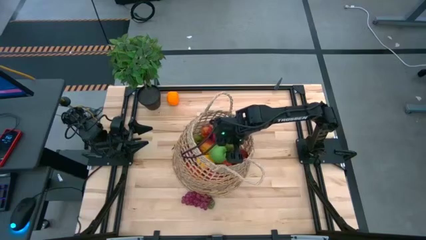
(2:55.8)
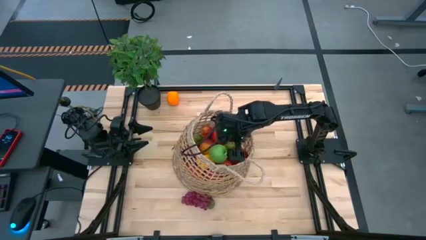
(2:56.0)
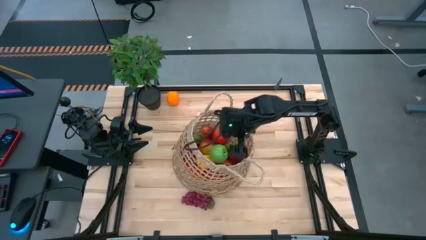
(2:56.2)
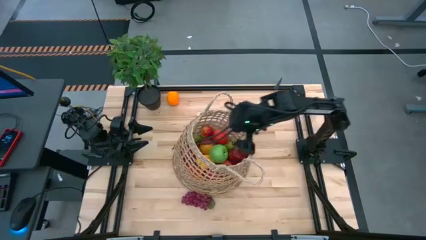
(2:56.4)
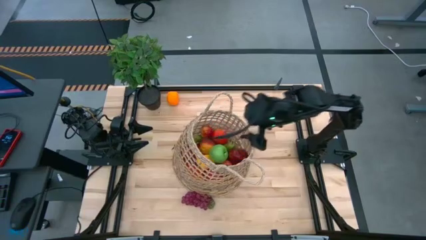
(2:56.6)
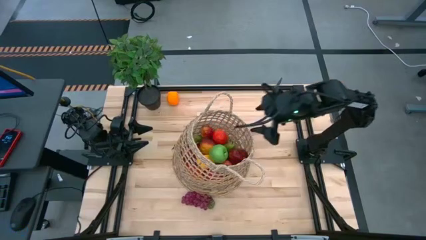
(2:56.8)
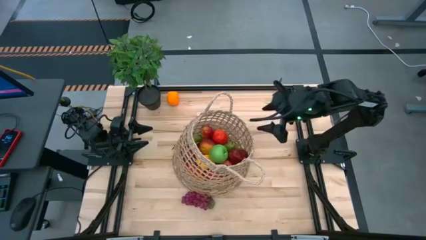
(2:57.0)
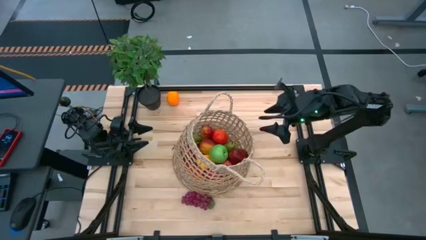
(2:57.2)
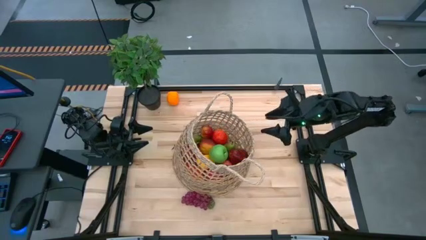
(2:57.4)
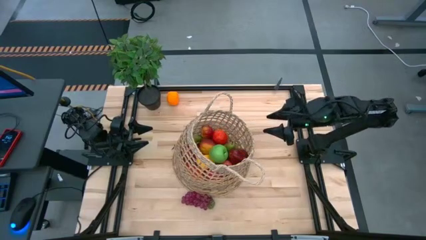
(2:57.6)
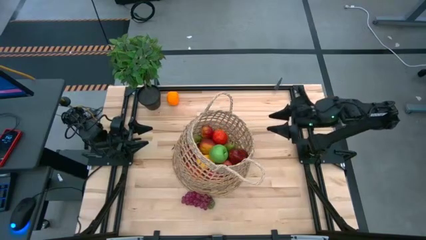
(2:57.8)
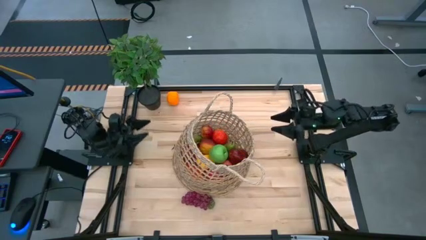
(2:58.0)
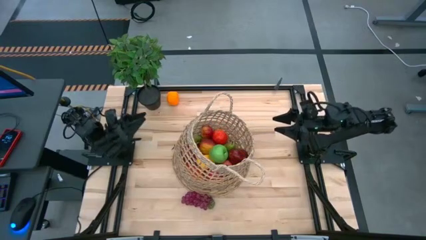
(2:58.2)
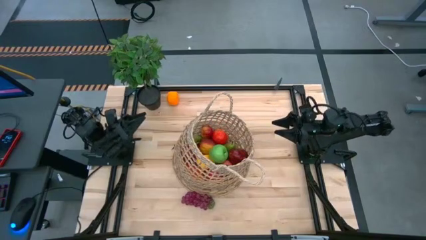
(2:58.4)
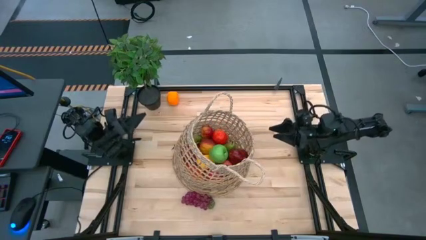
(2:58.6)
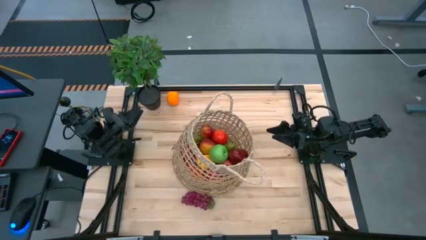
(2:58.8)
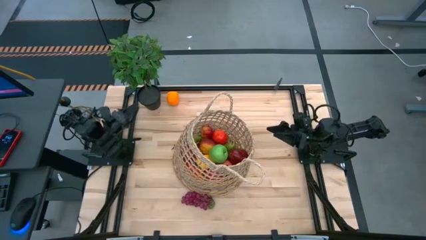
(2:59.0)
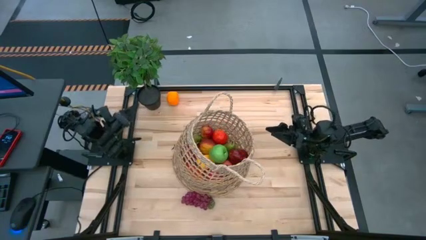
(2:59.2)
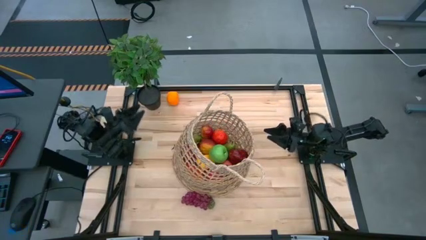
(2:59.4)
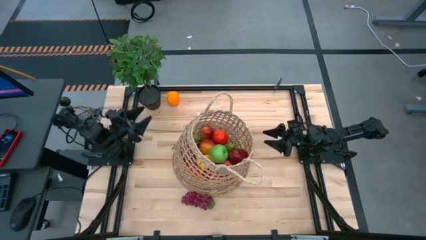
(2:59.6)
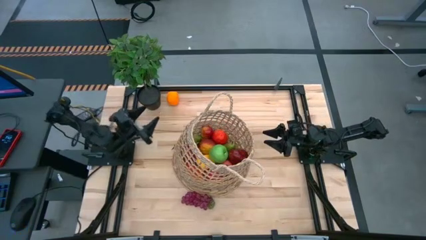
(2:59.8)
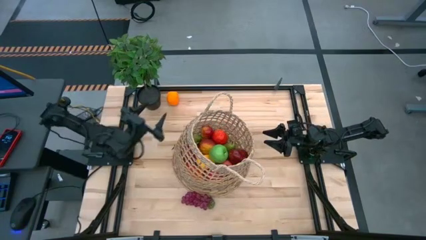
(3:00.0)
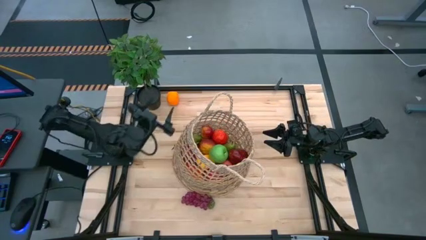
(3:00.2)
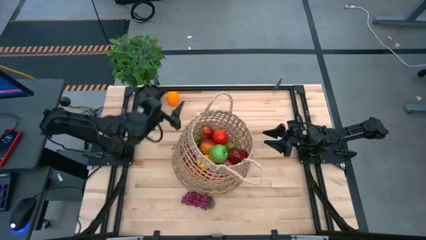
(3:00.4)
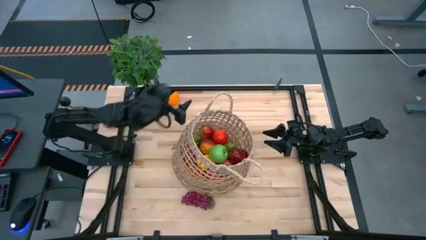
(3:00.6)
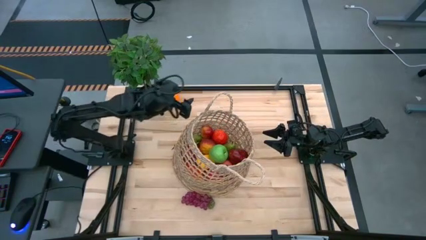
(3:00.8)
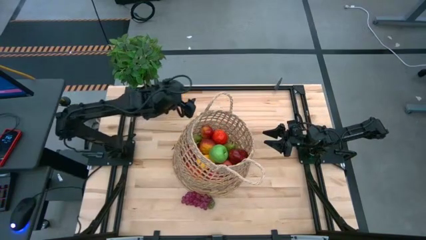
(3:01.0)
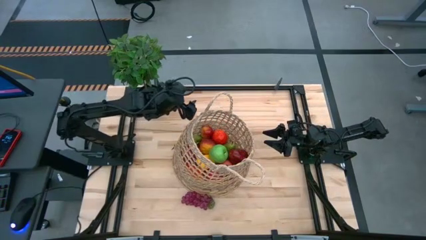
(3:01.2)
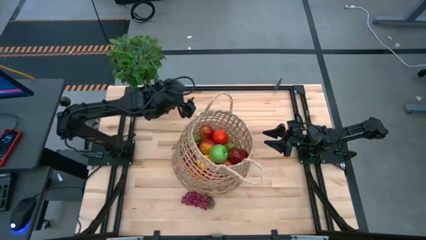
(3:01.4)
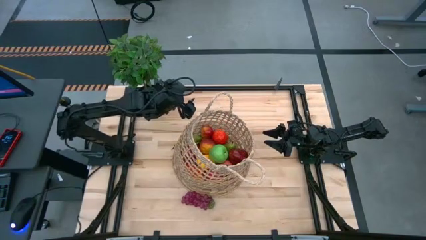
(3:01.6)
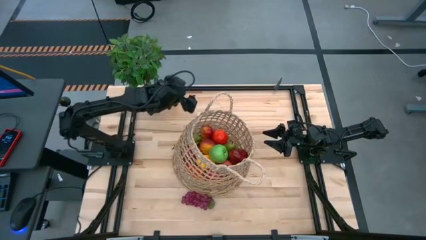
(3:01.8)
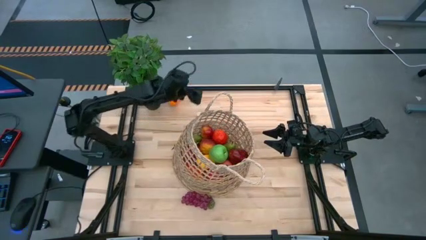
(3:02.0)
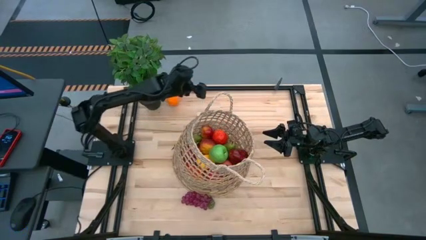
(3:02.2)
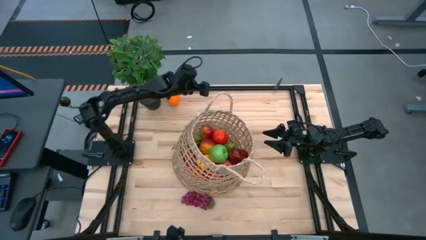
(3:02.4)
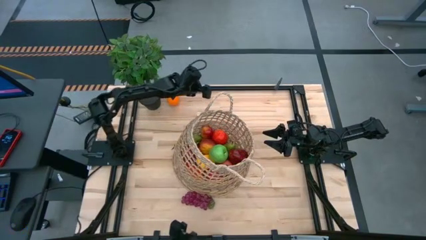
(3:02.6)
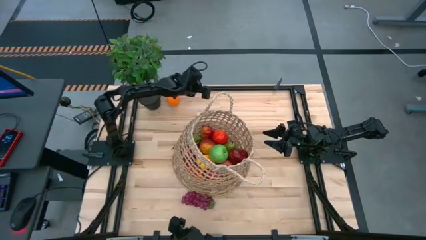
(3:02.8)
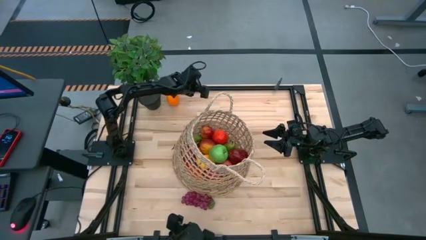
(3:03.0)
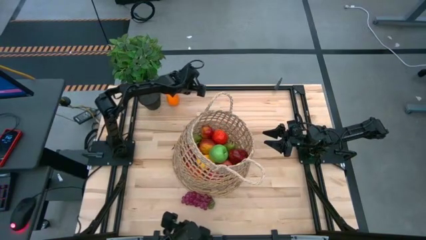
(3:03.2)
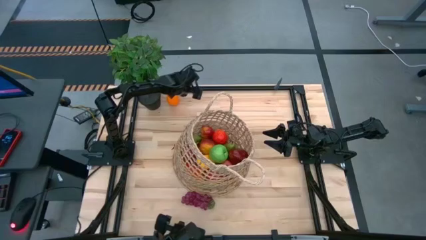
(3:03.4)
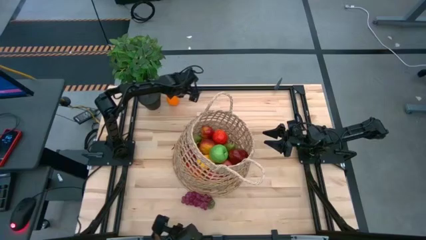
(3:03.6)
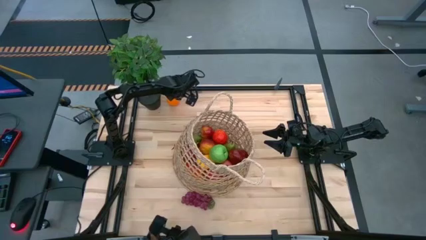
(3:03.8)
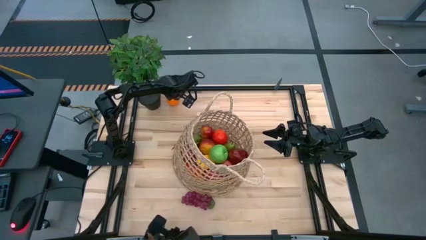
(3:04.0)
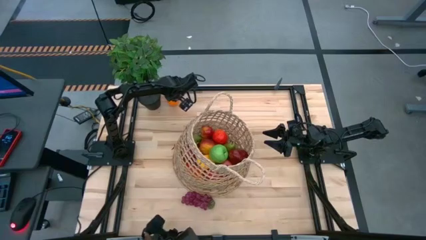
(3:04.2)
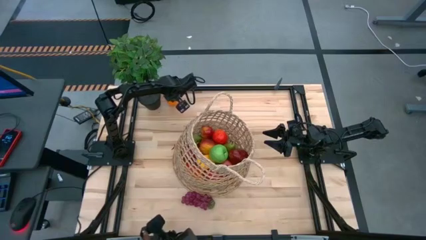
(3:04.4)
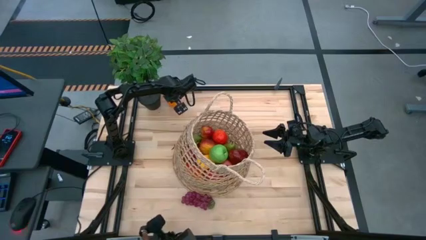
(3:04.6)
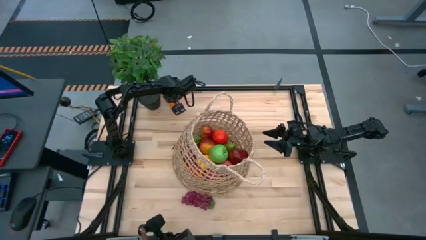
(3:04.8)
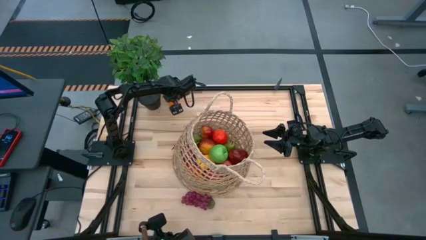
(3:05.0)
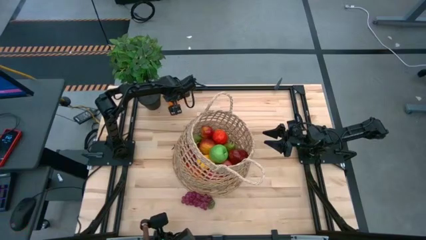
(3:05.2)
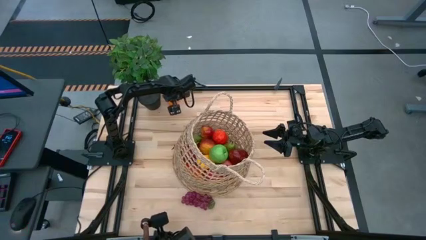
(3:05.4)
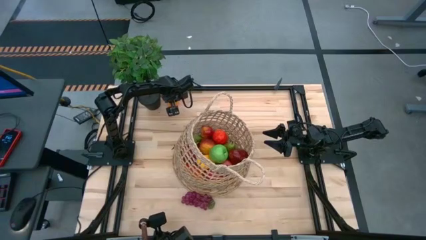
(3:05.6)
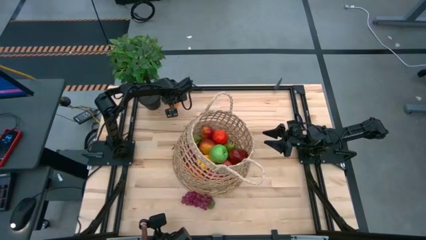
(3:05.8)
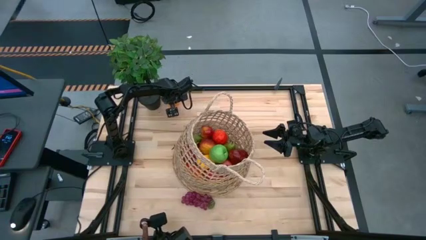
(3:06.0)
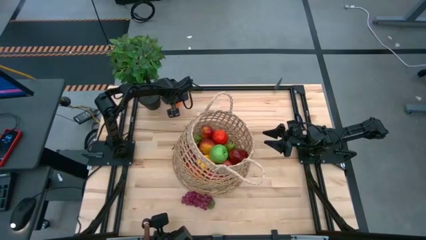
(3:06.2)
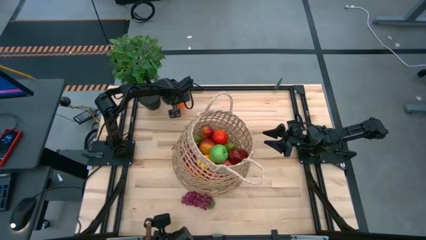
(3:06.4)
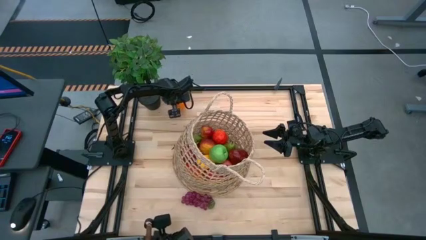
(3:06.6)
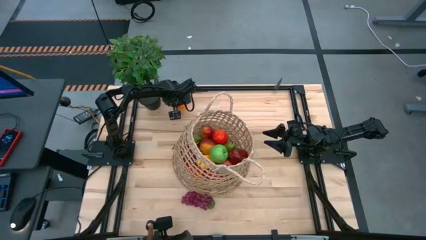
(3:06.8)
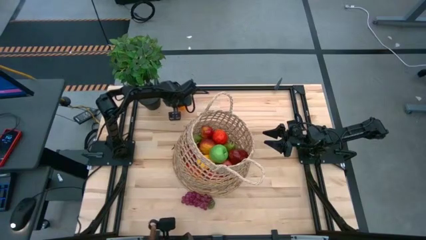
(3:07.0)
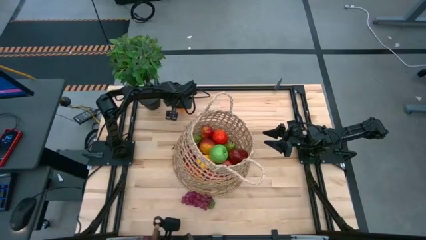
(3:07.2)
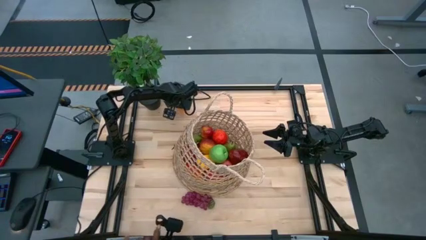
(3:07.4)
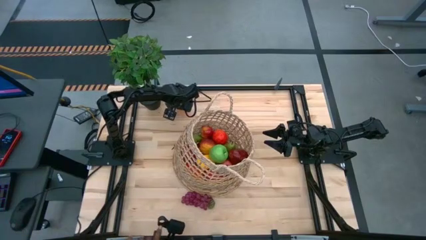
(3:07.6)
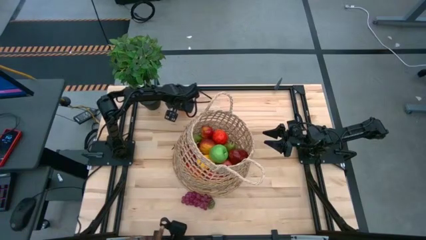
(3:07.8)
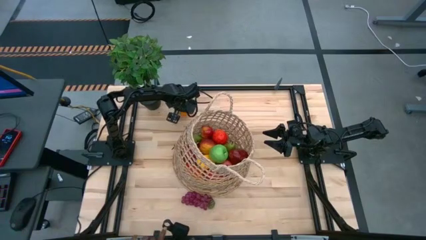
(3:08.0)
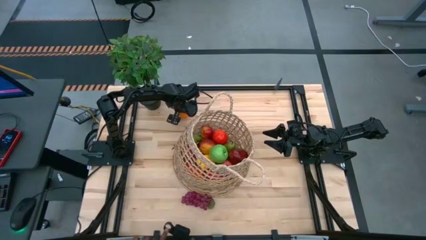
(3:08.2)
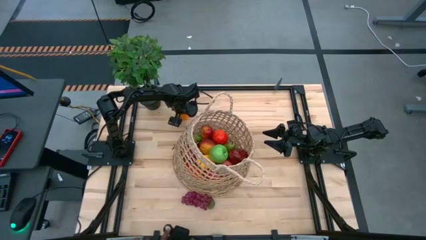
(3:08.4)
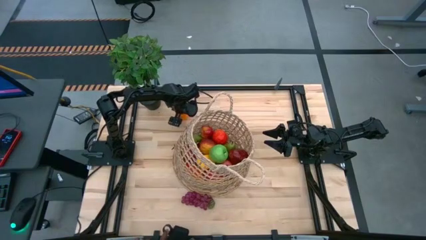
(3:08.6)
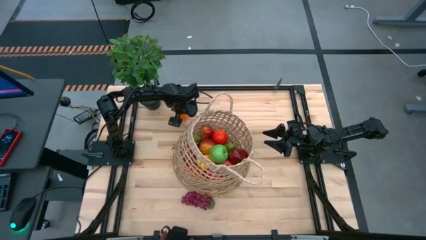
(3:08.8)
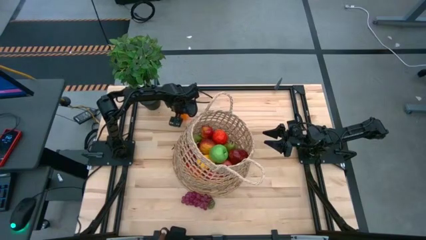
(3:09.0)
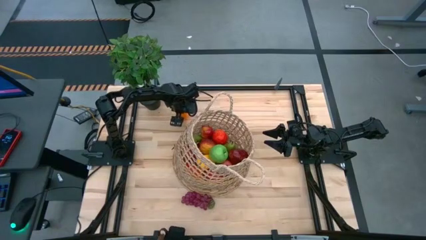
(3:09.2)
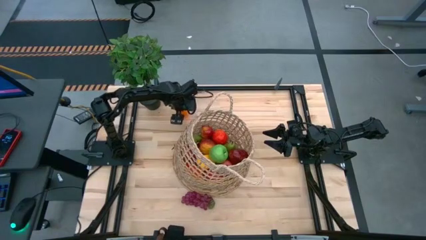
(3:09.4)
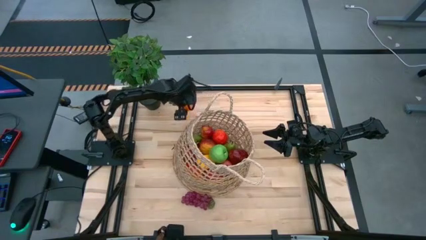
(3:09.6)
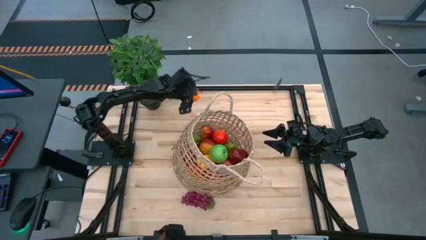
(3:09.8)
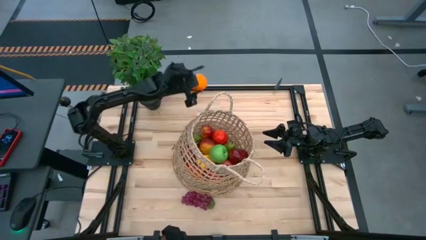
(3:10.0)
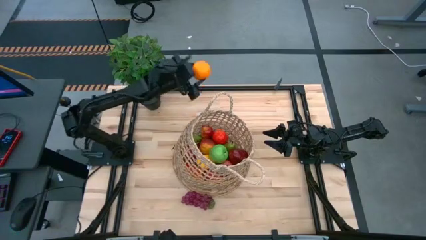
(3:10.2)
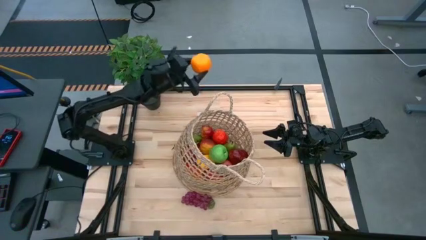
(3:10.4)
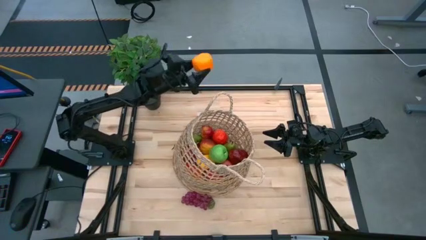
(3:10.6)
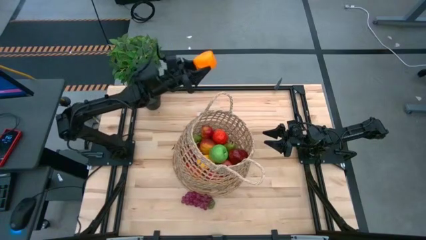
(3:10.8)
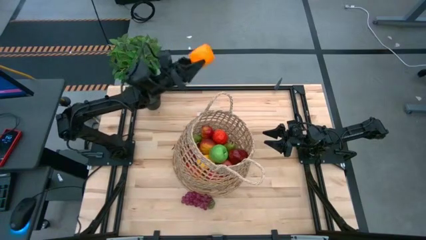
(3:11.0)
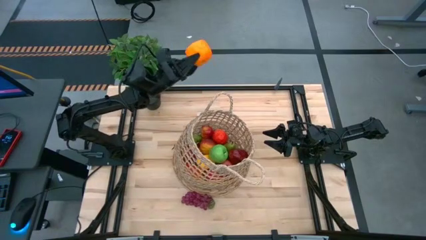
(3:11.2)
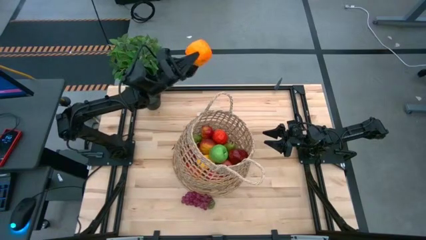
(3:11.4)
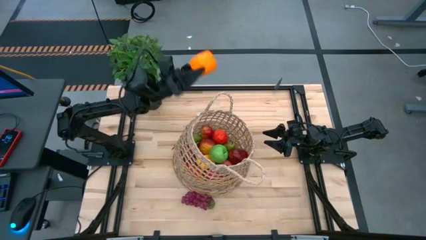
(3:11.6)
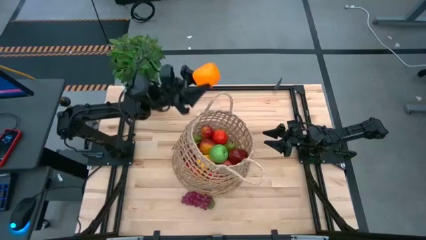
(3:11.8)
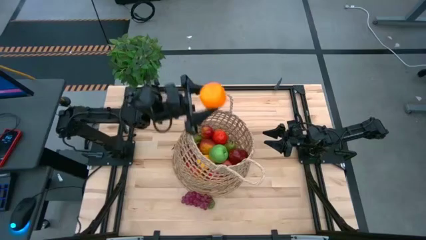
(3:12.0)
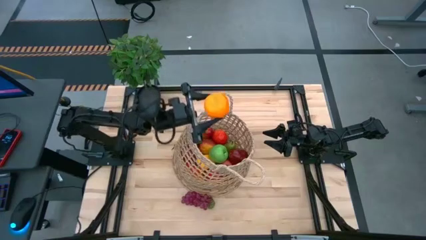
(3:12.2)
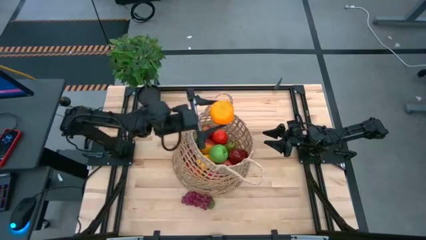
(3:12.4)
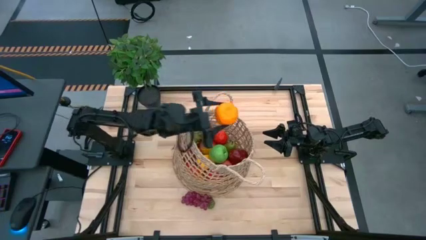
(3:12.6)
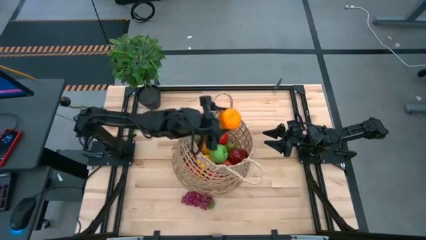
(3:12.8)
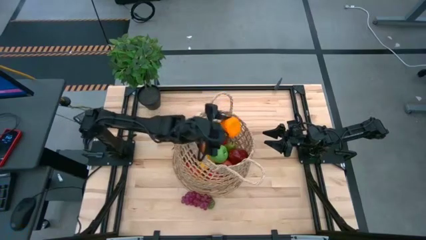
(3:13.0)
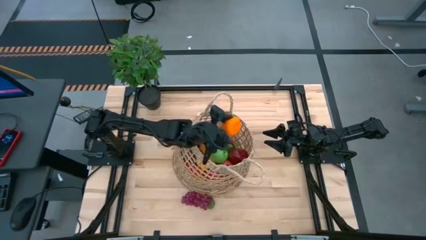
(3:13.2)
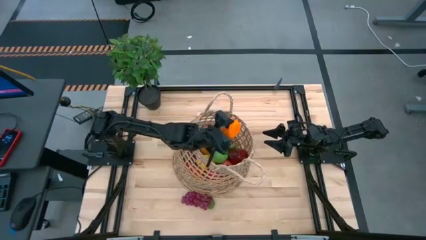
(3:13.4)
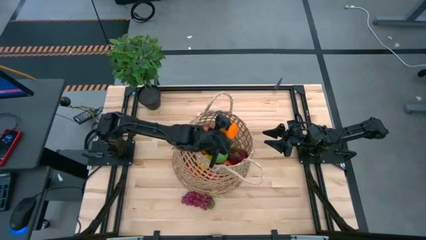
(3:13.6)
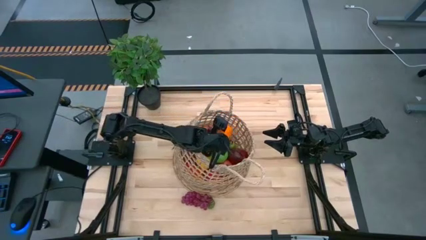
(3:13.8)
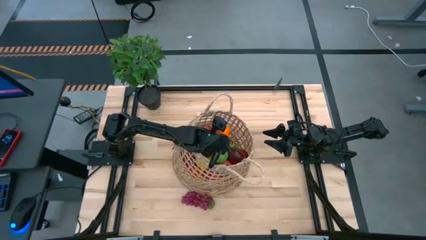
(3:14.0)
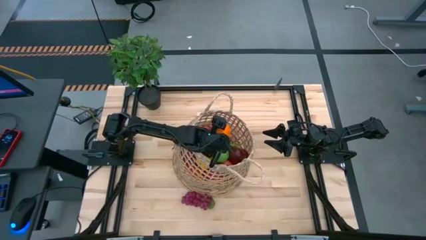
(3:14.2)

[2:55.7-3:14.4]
Task: Build produce basket
Put the orange into the basket
